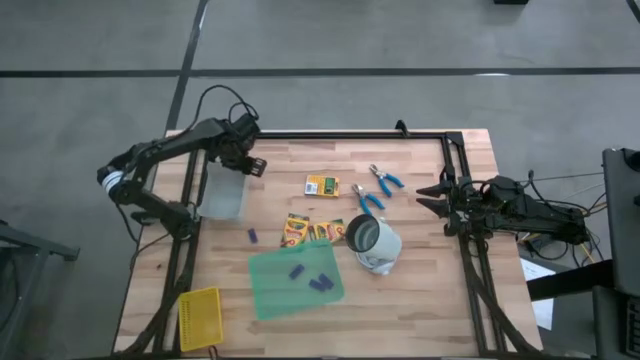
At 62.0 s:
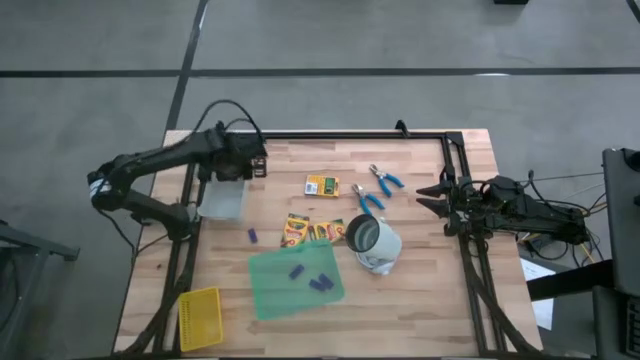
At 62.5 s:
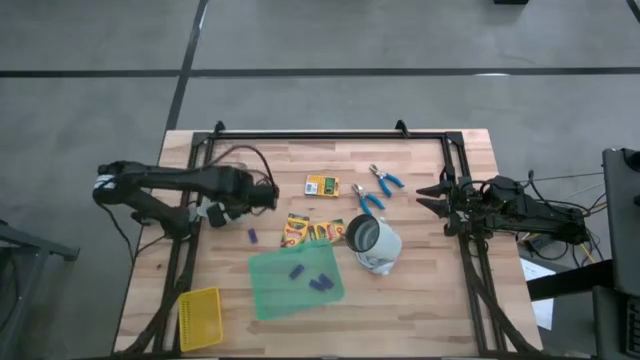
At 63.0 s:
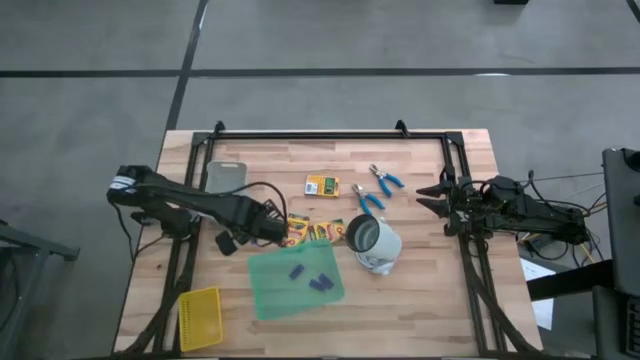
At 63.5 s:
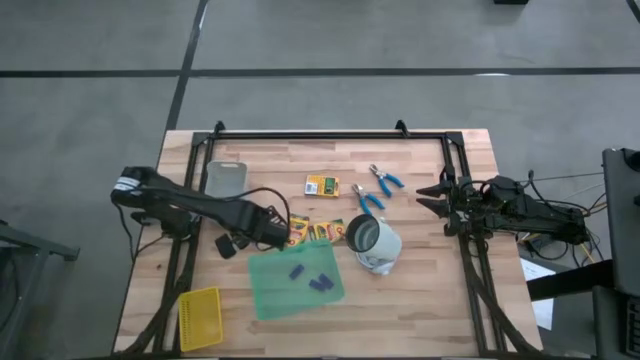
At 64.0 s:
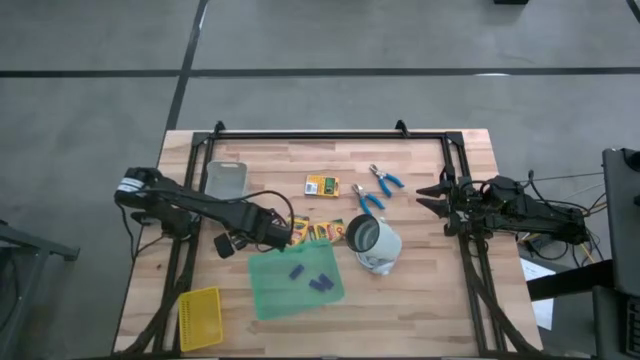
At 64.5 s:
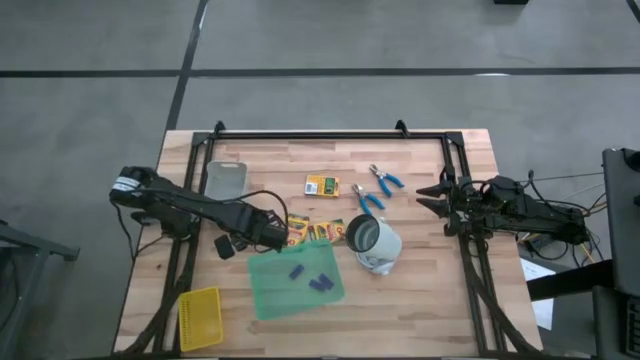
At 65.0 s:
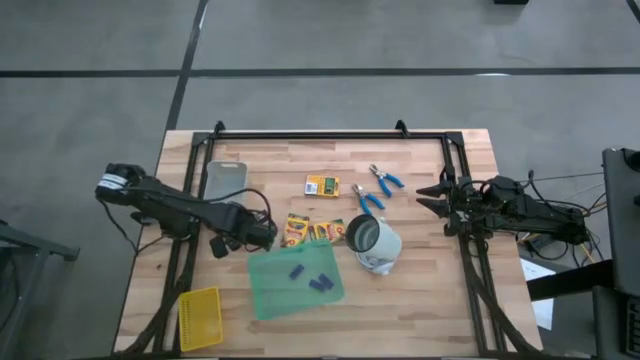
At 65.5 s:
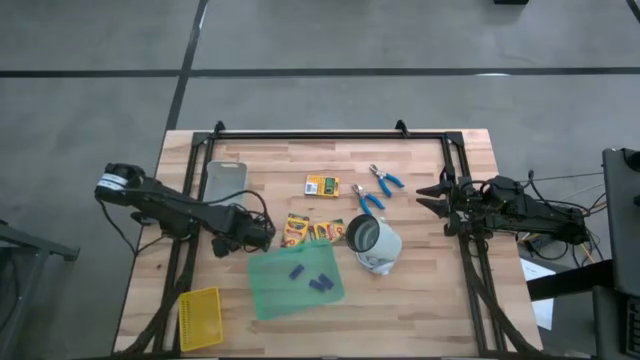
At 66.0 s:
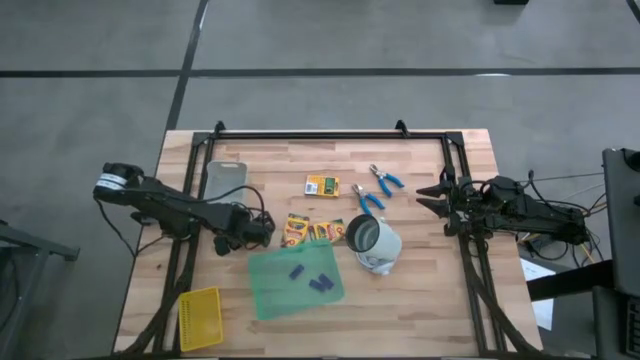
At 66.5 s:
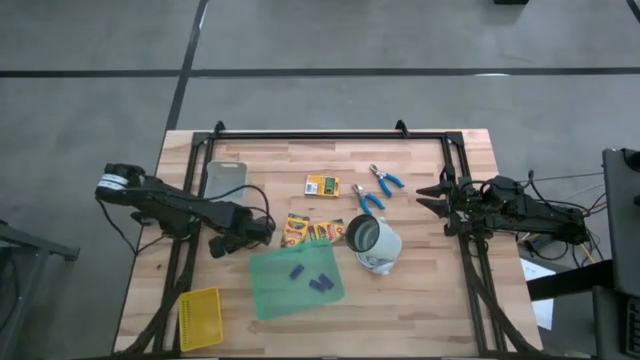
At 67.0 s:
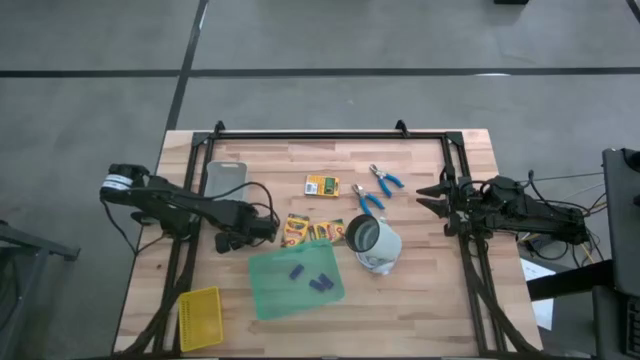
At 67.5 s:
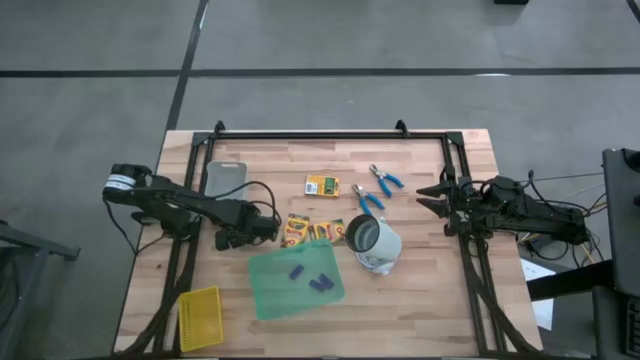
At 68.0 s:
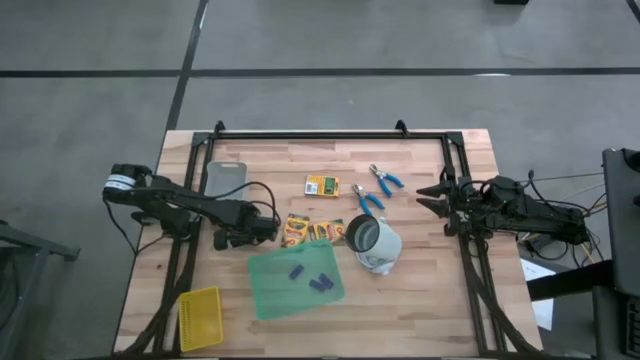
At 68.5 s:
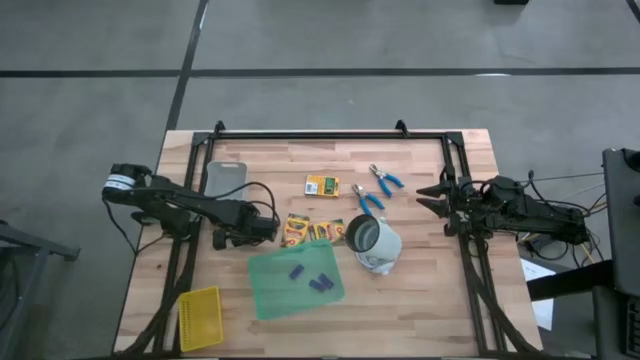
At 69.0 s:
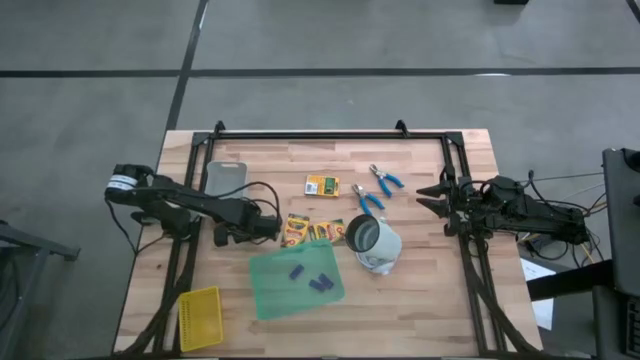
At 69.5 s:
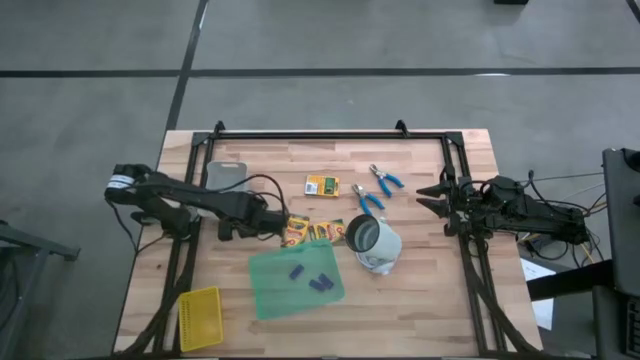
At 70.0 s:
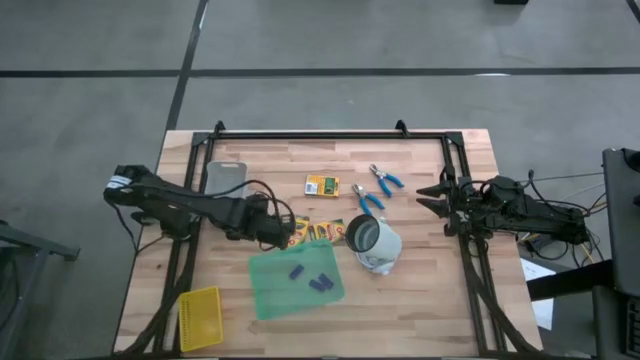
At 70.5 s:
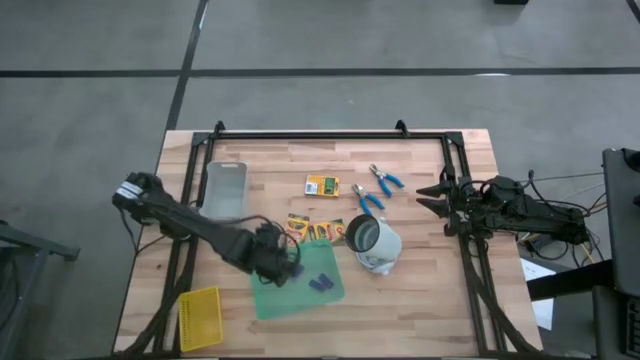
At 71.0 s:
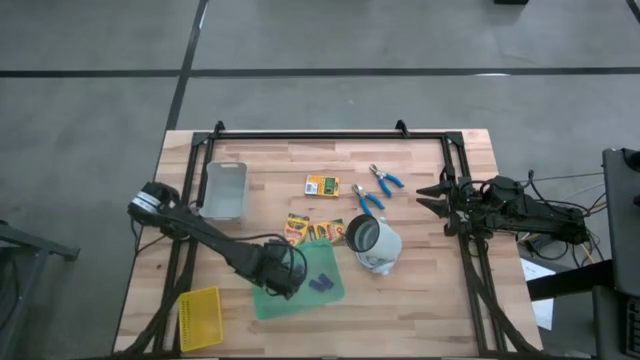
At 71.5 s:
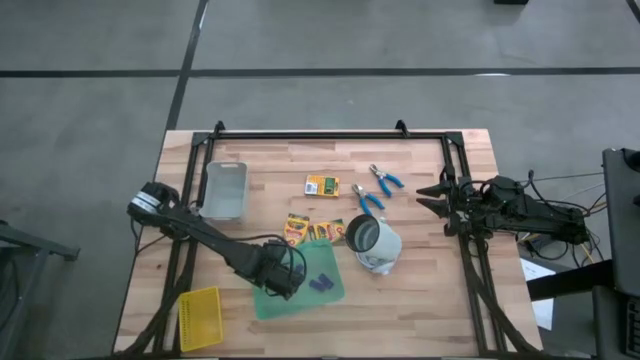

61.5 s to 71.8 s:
Task: Pick & Place School Supplies
Put the blue eraser into the green bin

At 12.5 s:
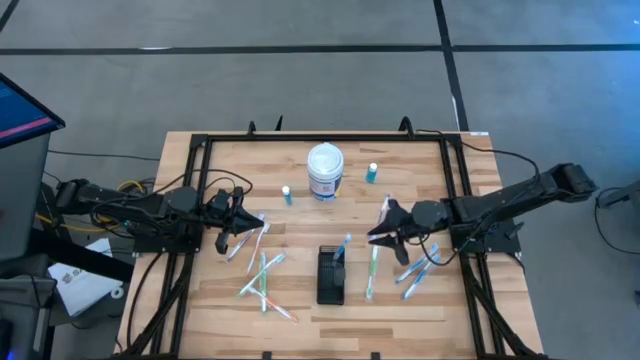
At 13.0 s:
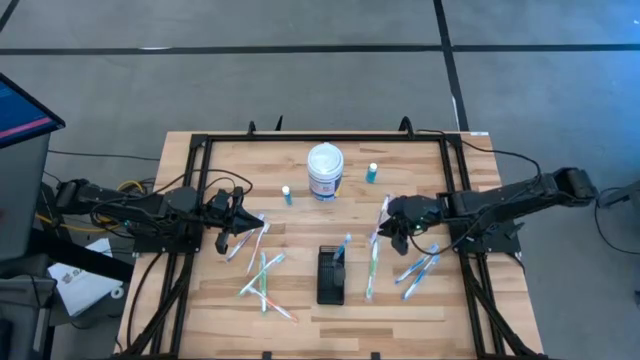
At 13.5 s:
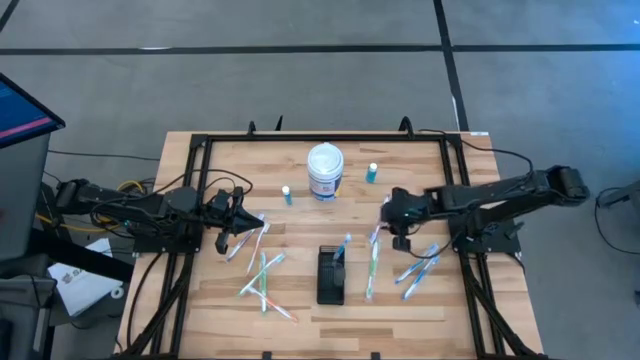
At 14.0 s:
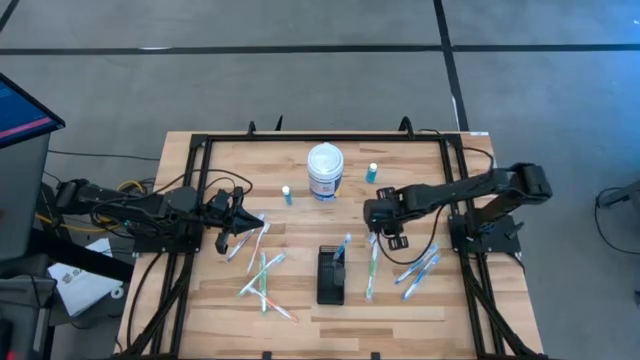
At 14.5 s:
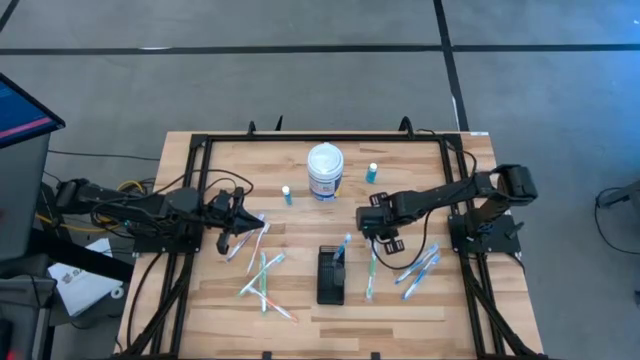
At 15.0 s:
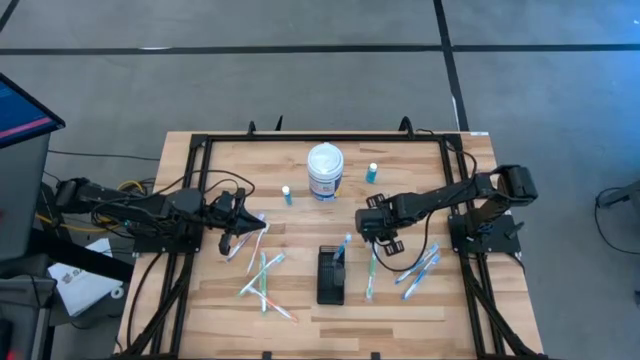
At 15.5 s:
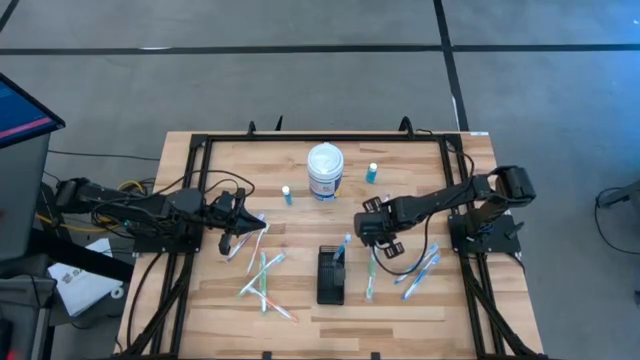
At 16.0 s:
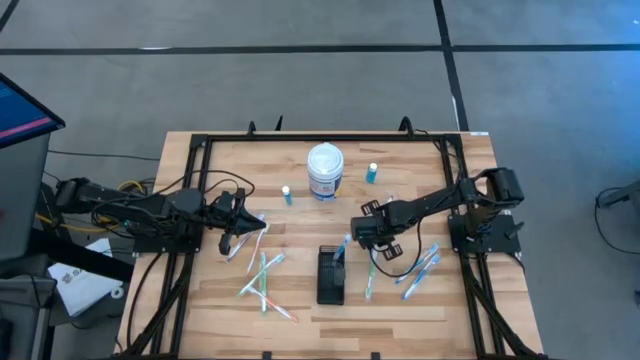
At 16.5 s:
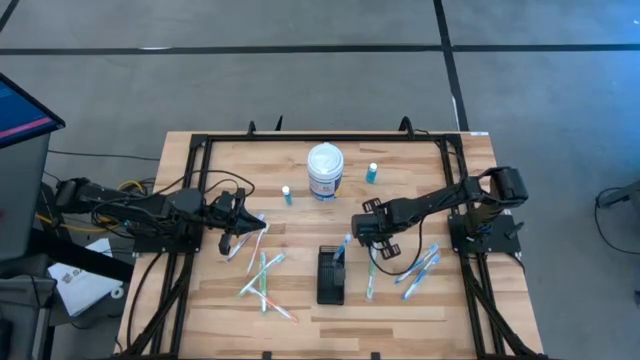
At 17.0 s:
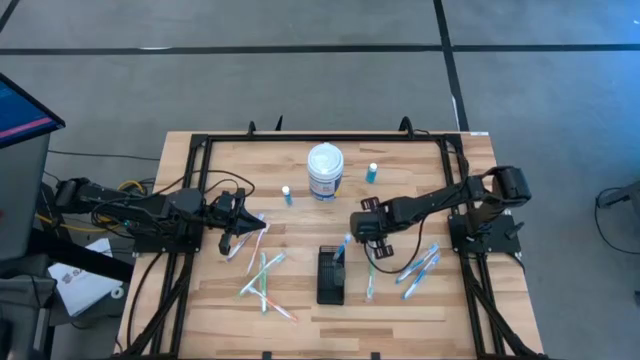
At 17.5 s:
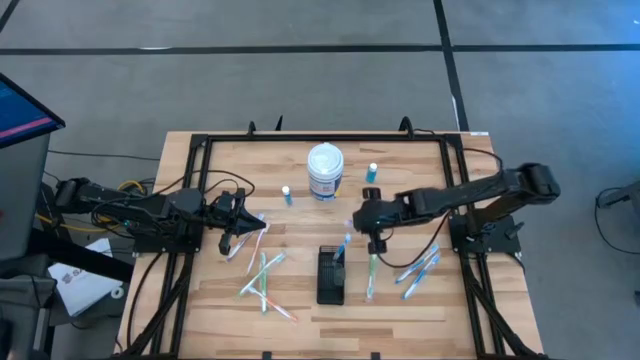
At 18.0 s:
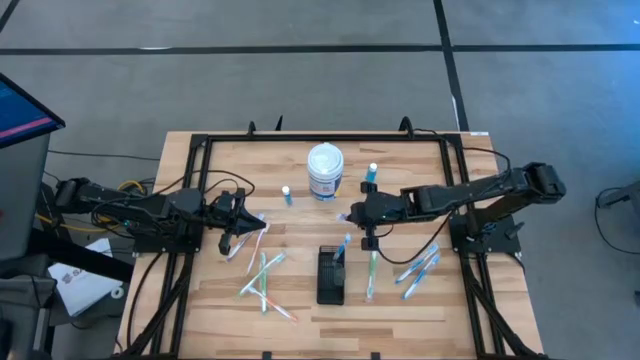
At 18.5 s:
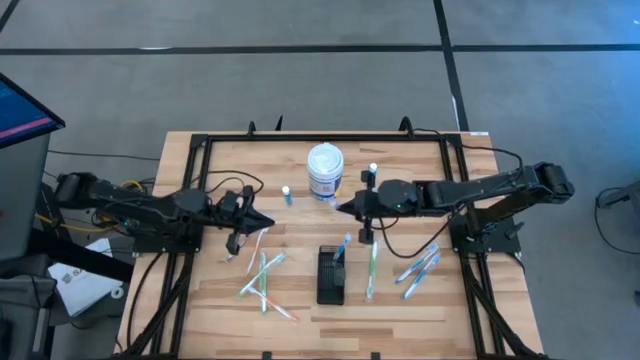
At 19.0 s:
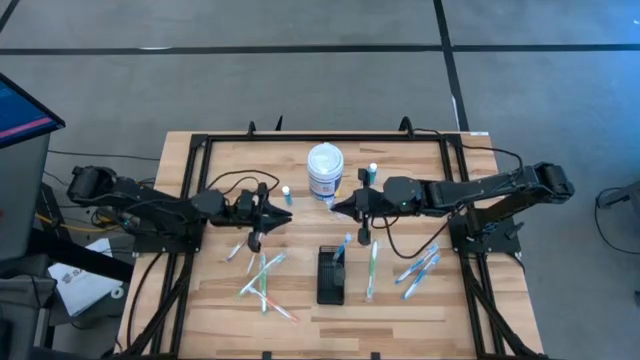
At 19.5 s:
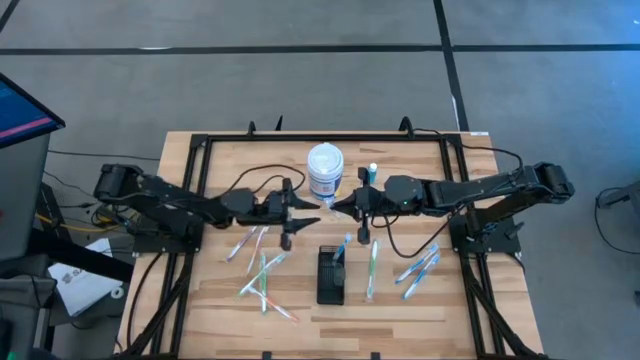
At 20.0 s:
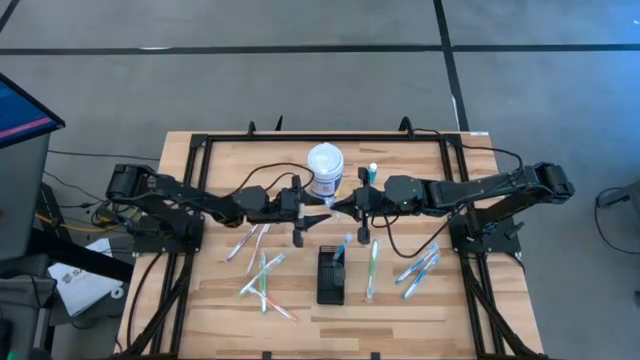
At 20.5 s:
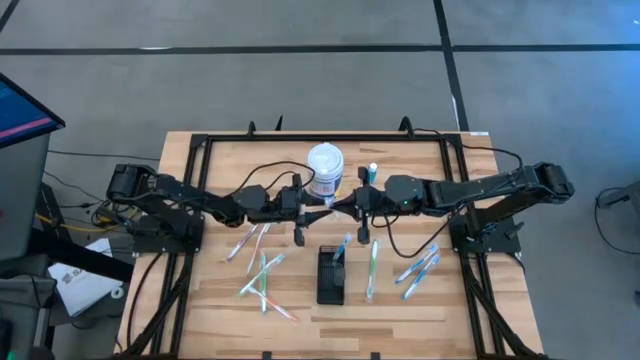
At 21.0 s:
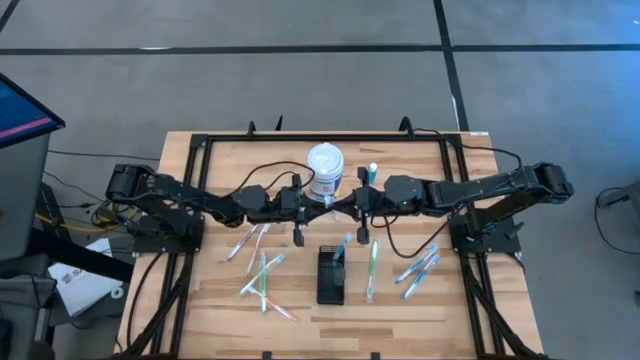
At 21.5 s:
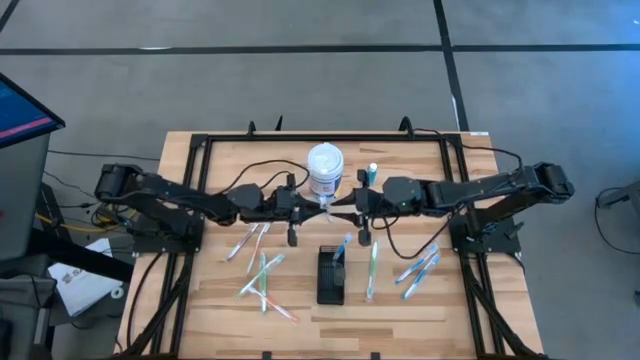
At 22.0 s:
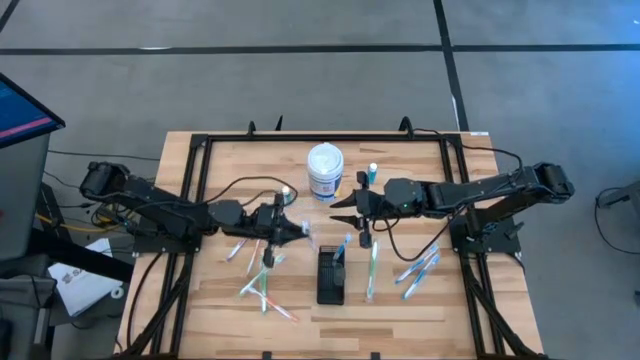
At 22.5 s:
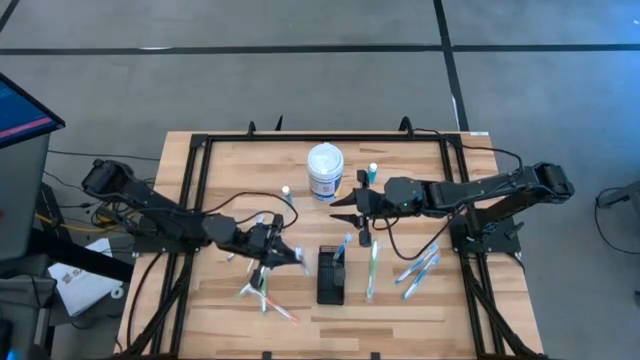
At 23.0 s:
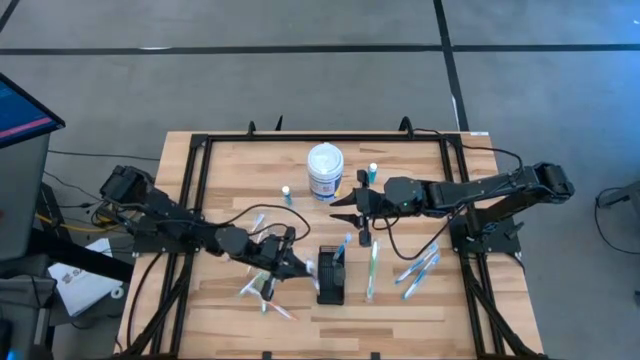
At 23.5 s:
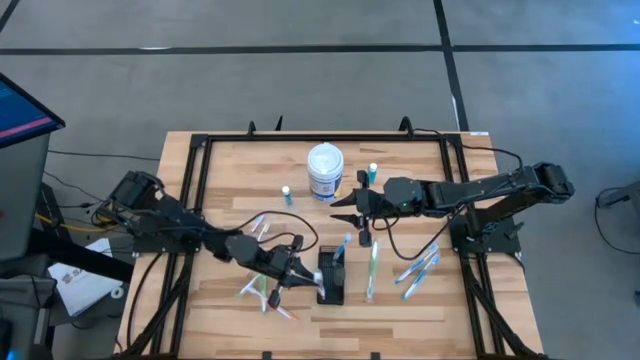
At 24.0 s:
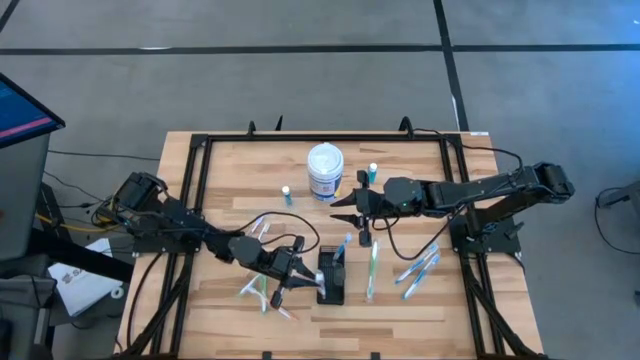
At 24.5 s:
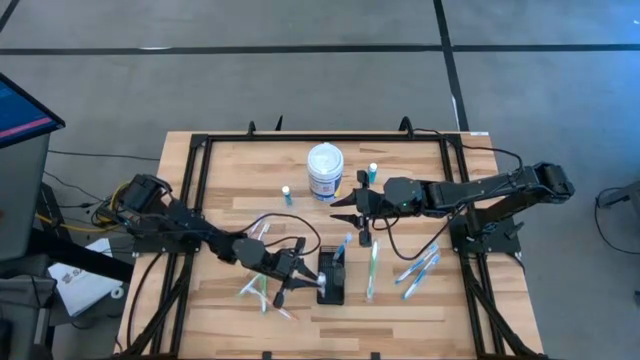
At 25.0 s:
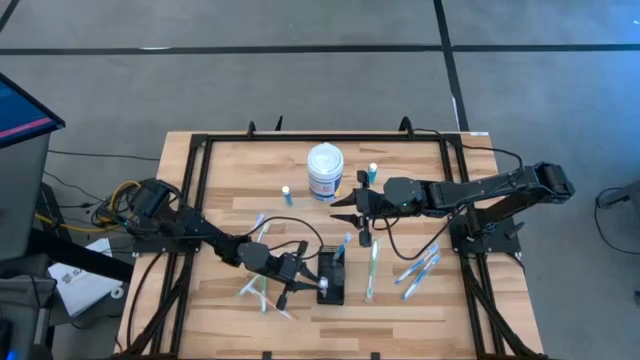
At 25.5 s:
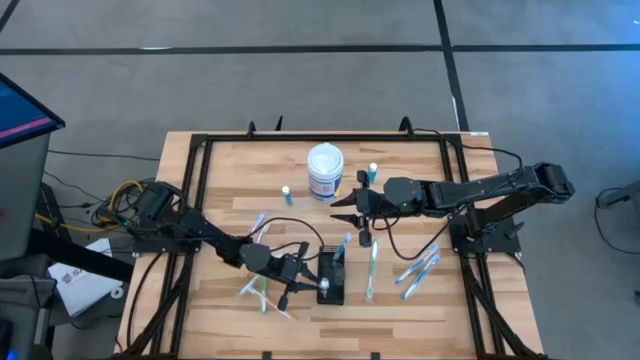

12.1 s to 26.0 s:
Task: Pick & Place toothbrushing station
Put the right violet toothbrush into the black mesh organizer
